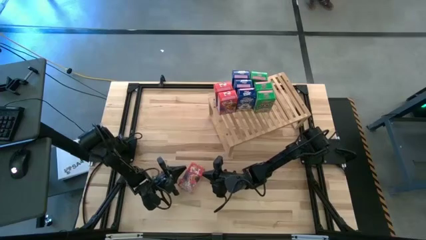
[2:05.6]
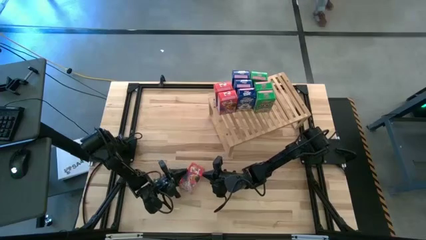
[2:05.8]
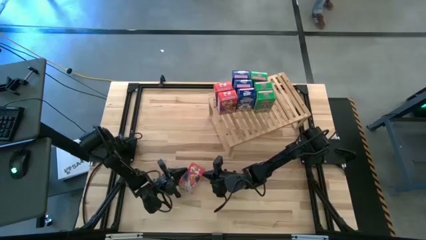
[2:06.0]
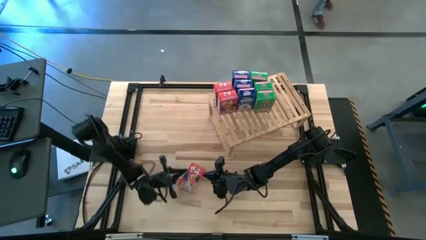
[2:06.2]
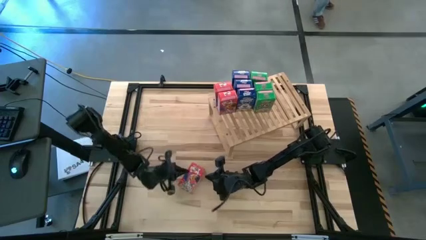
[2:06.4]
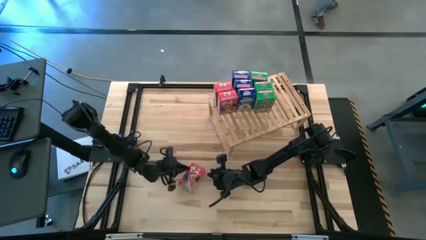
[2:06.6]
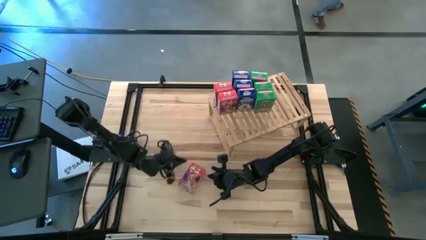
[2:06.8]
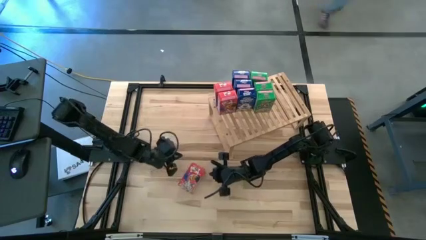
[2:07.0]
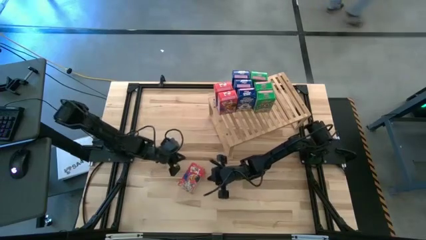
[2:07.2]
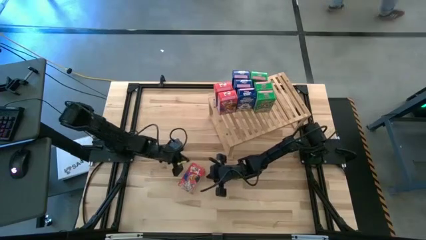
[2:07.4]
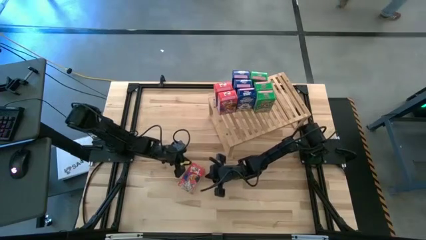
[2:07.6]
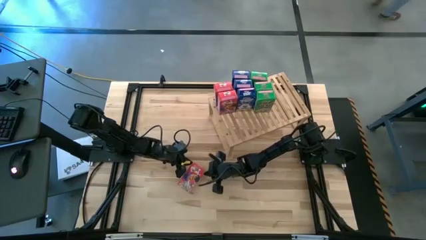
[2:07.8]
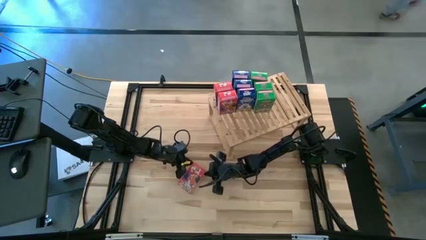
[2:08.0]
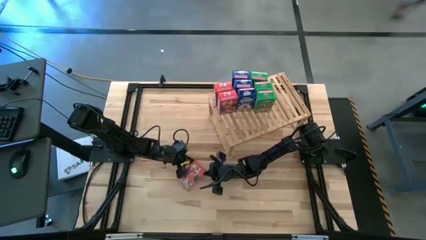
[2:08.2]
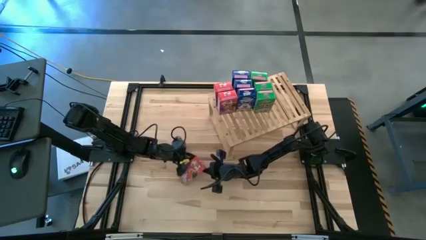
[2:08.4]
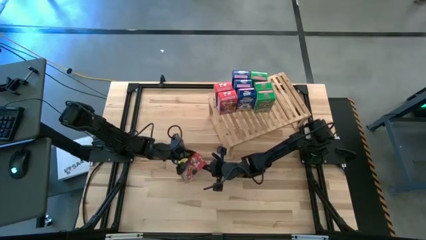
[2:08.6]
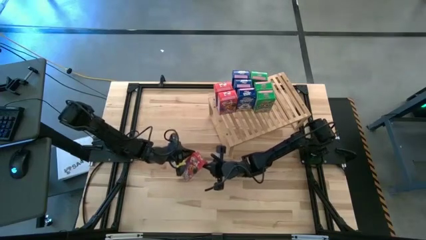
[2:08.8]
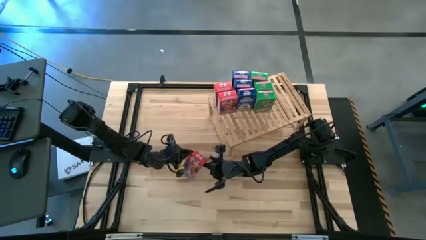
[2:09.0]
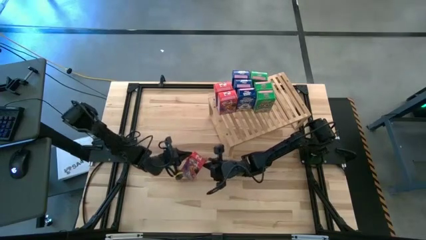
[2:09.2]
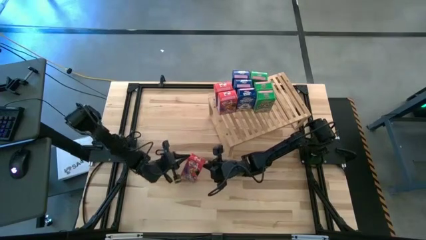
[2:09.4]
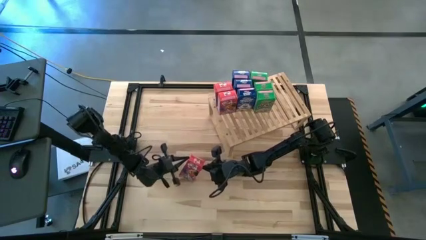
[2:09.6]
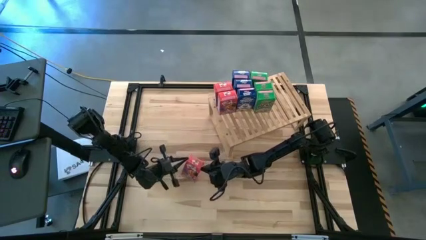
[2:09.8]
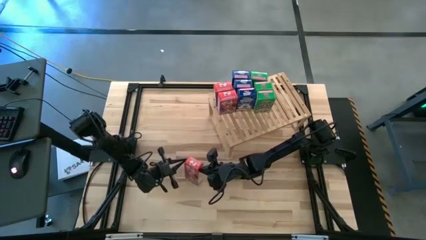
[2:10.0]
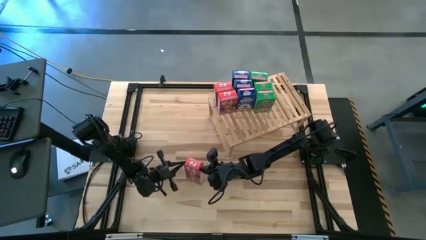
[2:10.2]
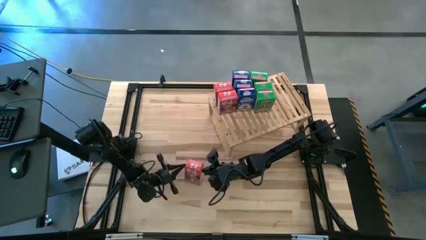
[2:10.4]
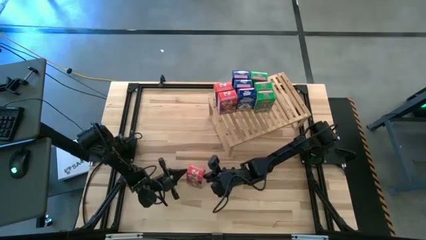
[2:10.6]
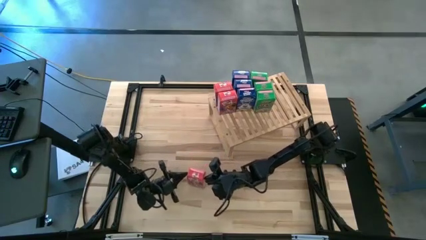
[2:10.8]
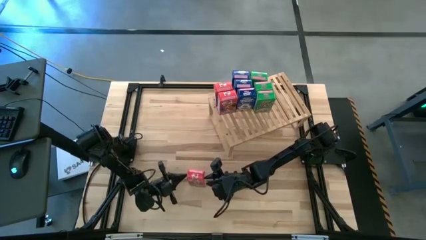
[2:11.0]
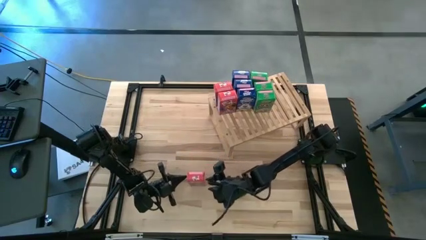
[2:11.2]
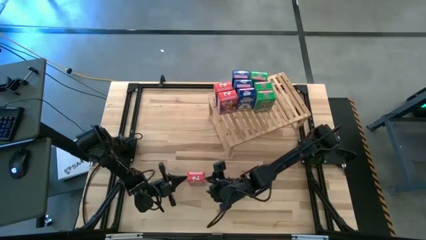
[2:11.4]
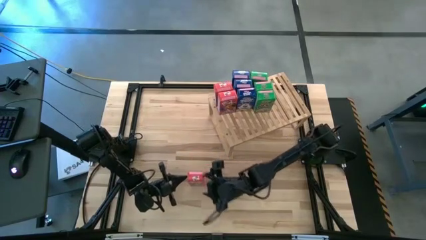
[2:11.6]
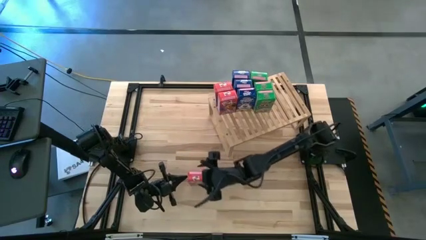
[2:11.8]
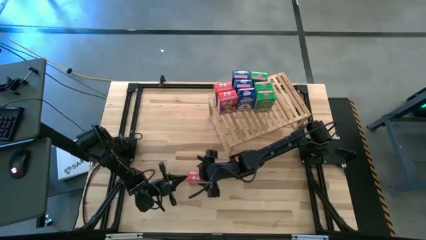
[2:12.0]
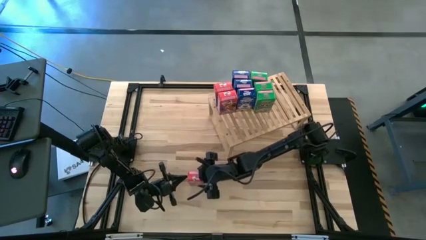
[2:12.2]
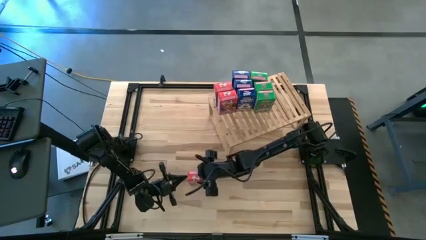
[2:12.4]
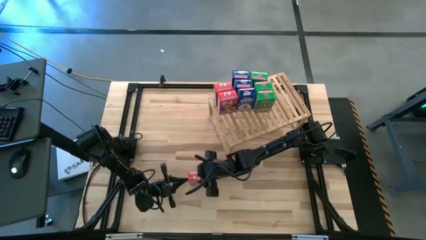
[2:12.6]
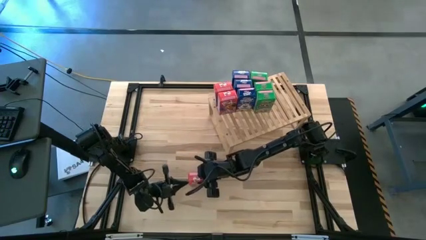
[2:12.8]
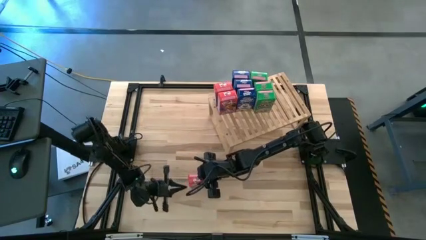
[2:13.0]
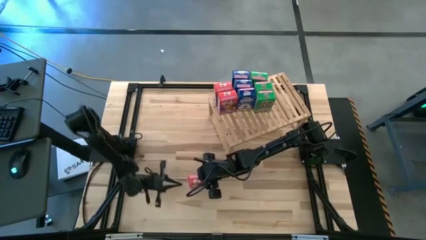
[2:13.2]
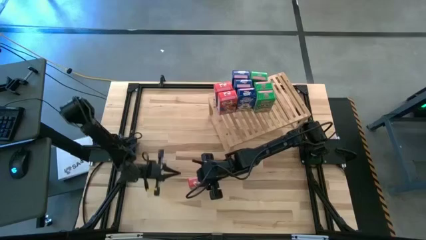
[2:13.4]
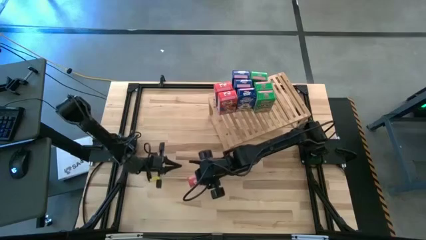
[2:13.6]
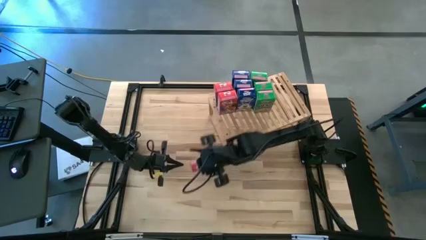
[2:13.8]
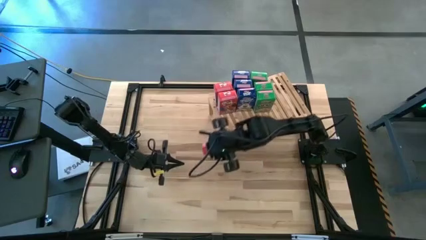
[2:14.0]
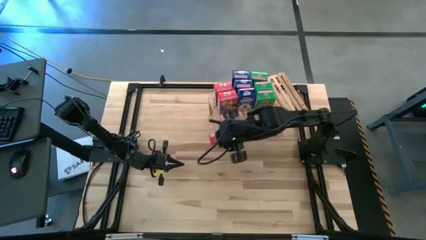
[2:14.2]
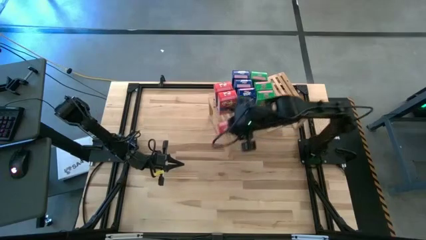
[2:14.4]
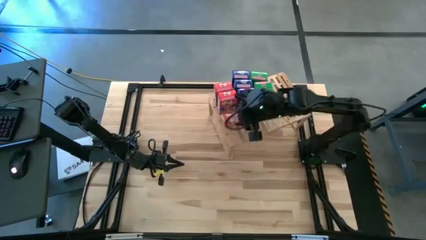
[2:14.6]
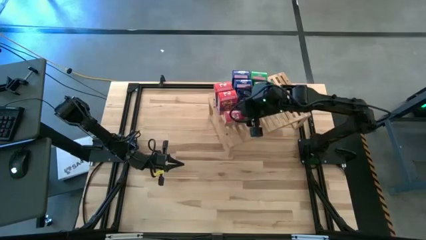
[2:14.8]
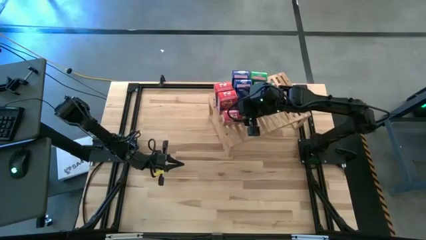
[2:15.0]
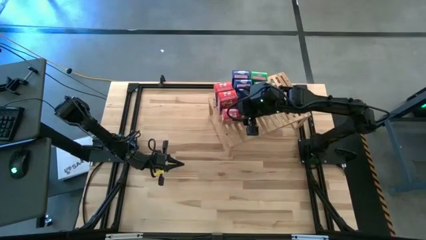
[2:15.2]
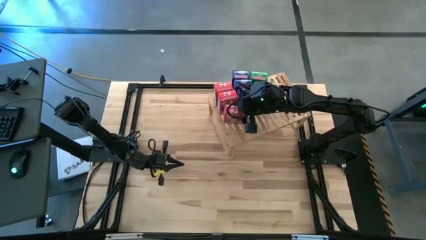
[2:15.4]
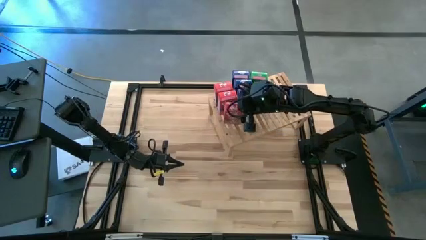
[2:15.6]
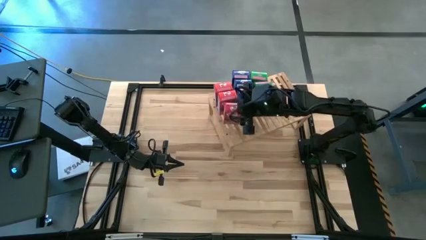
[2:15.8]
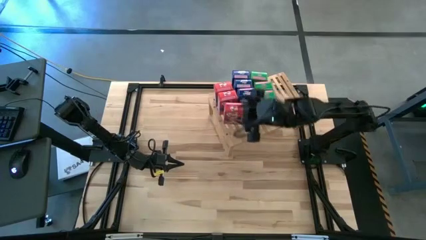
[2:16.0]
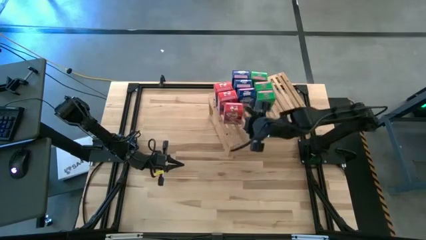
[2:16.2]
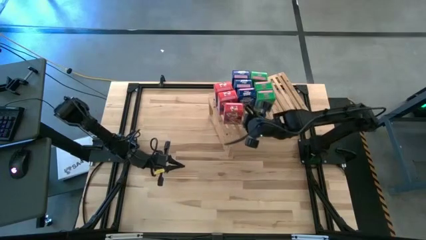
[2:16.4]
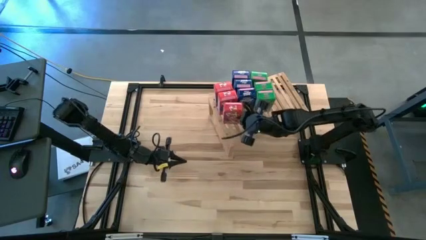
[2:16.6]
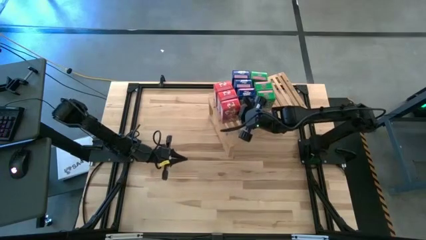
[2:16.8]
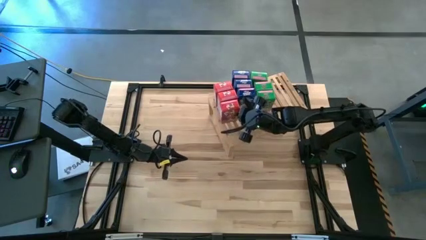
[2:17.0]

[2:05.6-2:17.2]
Task: Stack cereal on shelf
Put the red cereal box on the shelf aligned with the other red cereal boxes

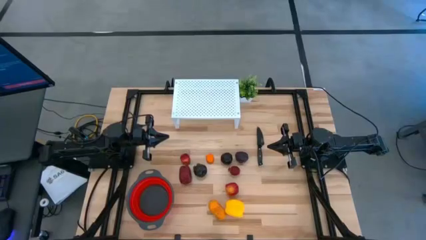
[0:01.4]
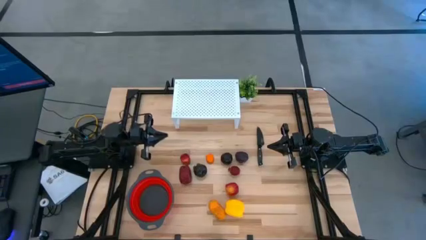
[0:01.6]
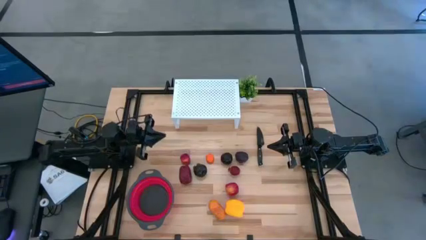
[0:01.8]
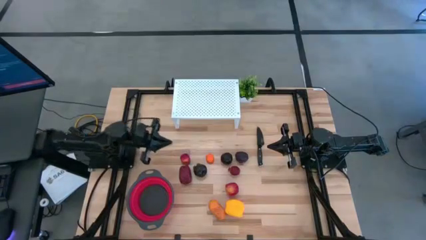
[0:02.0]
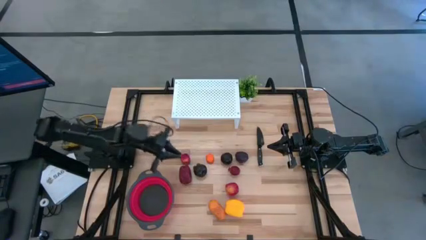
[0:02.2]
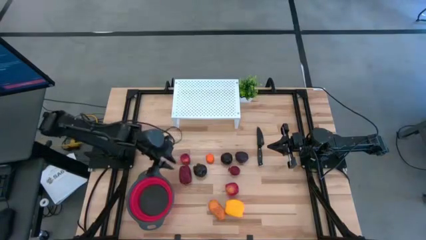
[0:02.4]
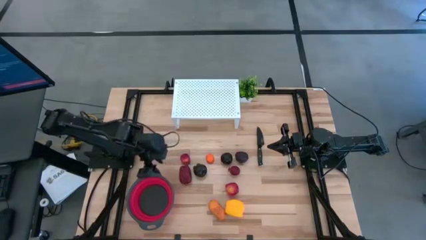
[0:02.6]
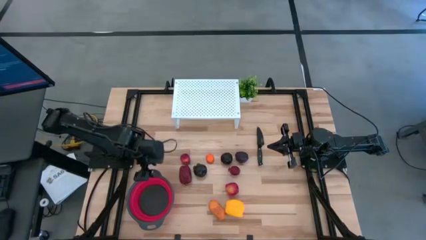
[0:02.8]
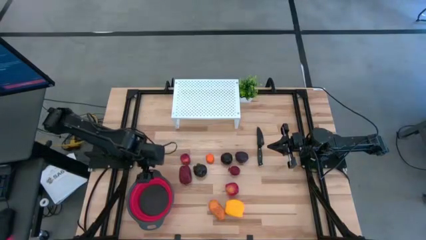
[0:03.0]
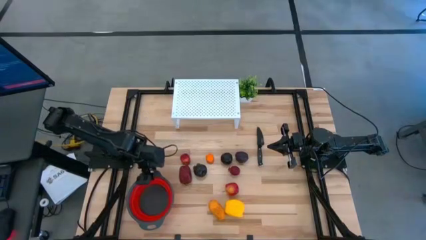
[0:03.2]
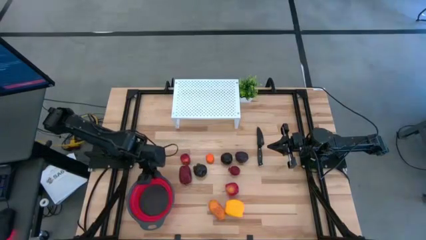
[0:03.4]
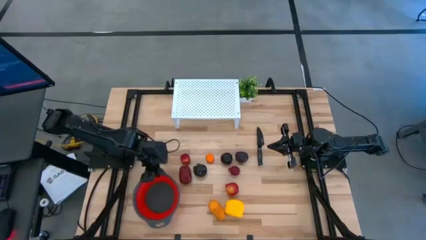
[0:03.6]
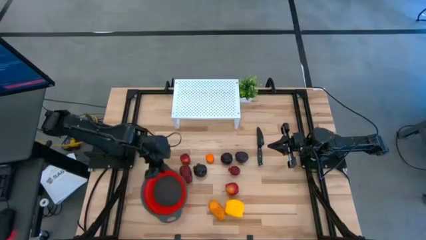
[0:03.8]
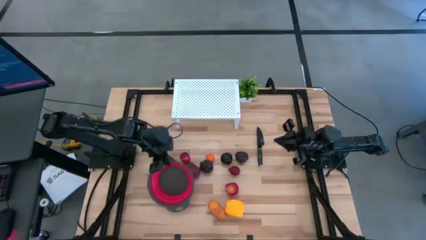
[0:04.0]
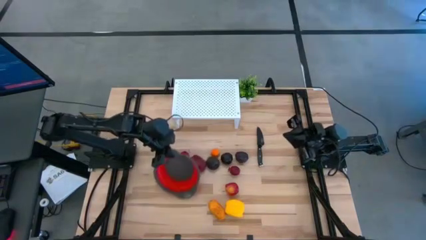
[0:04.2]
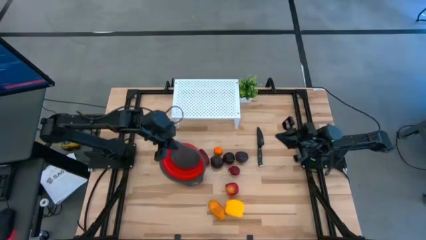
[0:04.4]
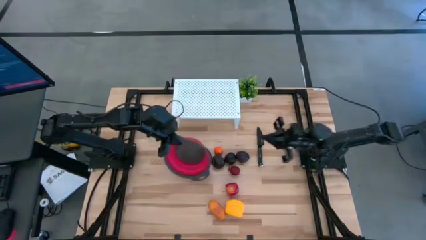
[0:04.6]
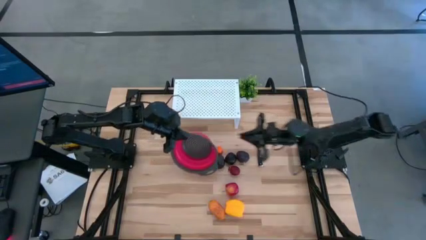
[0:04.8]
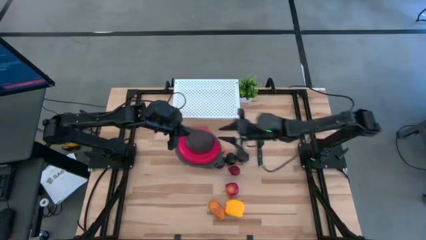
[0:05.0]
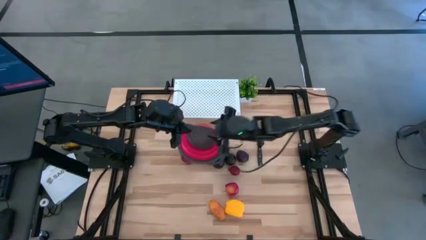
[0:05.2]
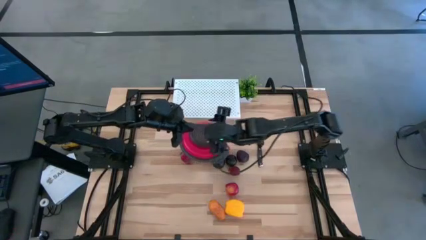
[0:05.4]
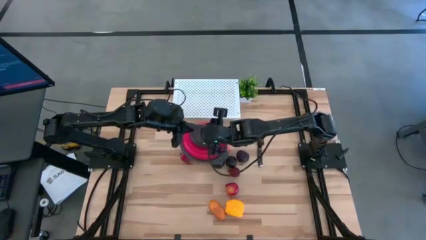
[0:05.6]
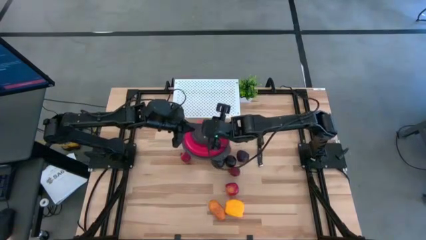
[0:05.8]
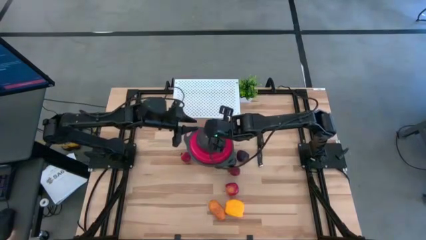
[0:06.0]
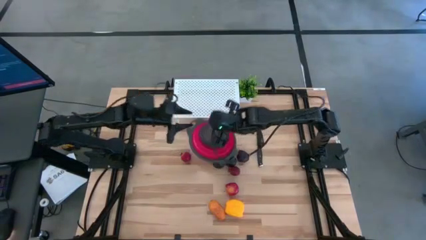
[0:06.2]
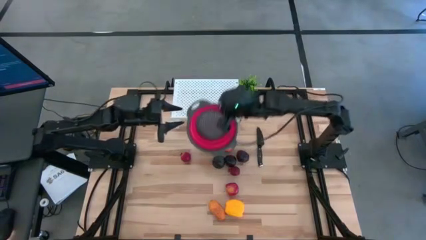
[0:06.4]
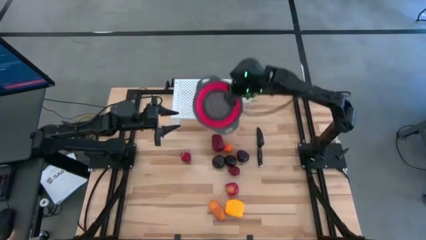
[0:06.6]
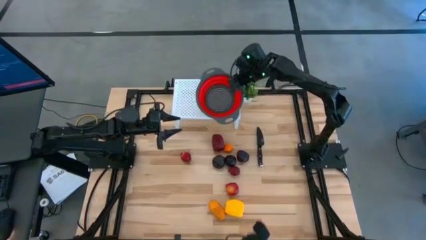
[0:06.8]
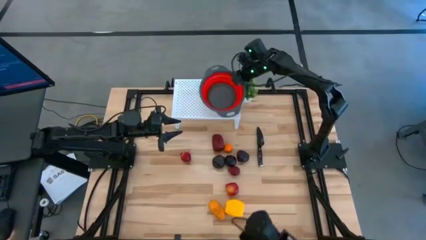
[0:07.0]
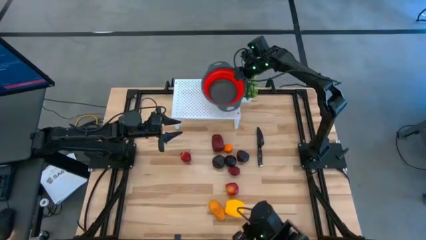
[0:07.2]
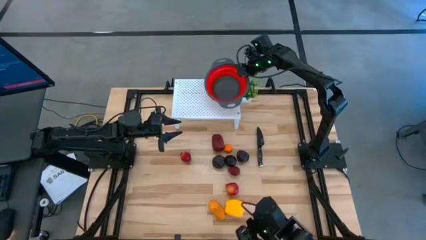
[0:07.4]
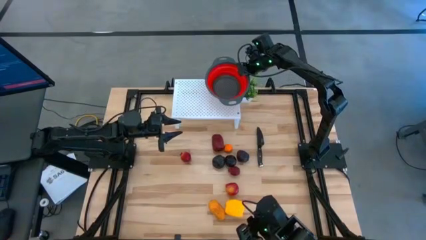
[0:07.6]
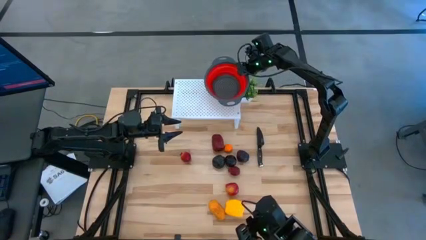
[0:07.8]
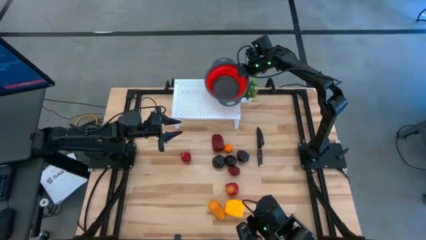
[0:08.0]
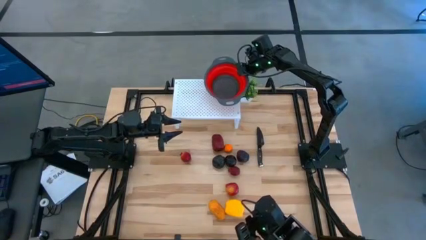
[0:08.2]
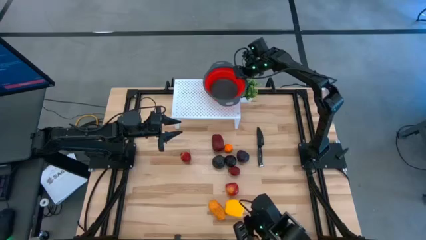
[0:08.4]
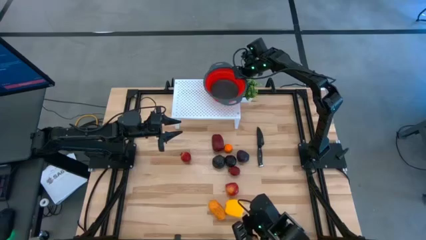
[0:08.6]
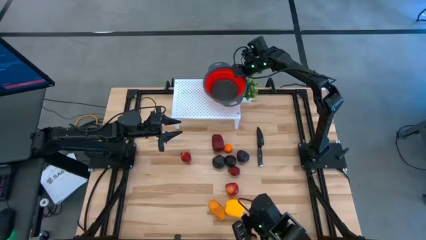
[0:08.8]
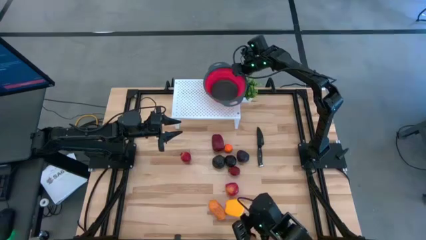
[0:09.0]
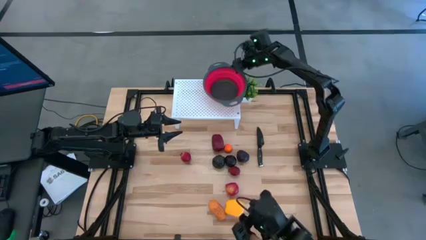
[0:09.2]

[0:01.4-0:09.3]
Task: Pick & Place Fruit
Put the red strainer bowl on the shelf
